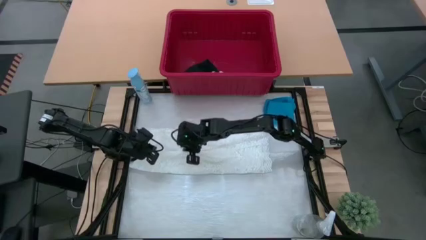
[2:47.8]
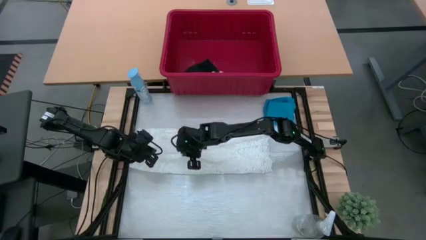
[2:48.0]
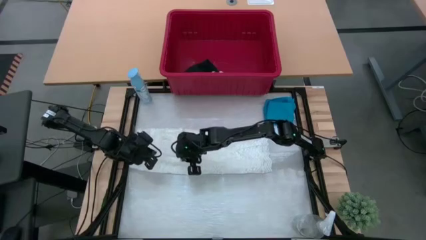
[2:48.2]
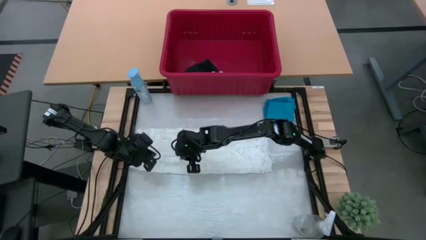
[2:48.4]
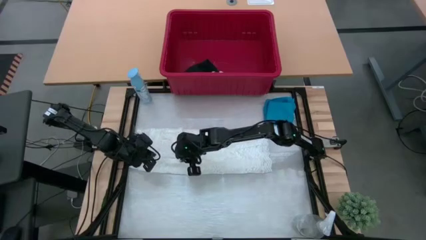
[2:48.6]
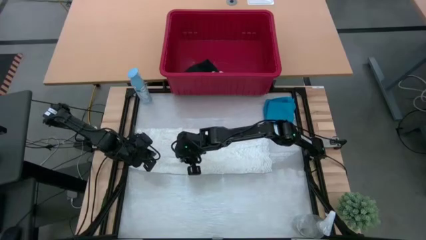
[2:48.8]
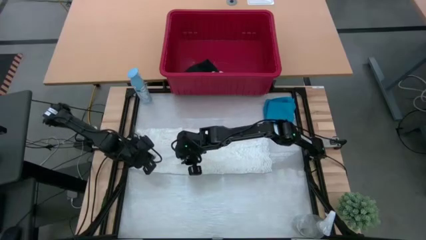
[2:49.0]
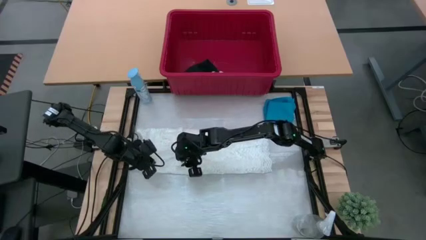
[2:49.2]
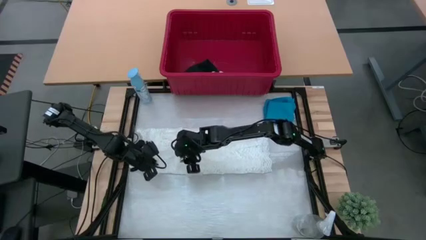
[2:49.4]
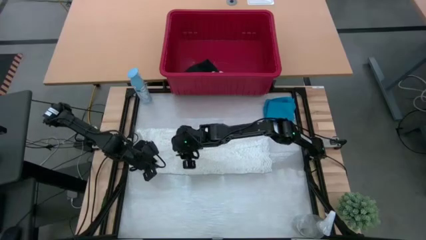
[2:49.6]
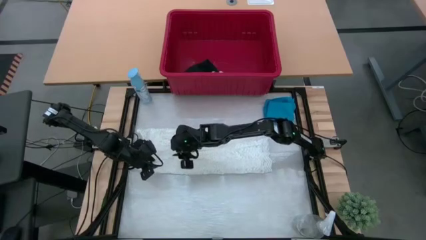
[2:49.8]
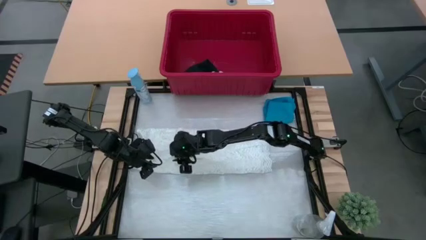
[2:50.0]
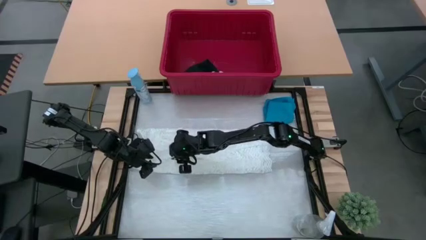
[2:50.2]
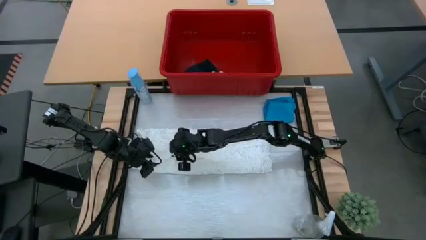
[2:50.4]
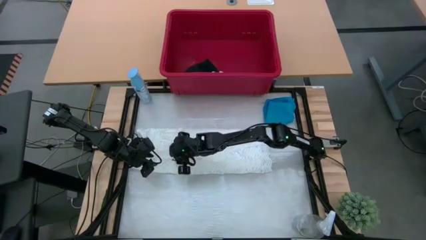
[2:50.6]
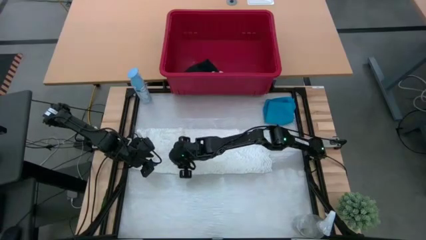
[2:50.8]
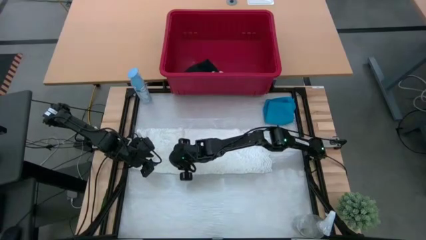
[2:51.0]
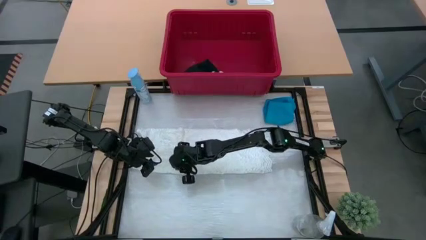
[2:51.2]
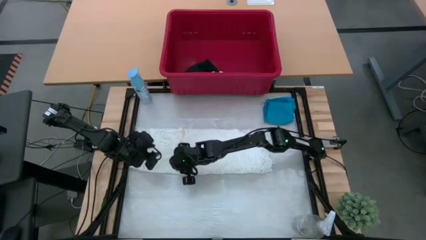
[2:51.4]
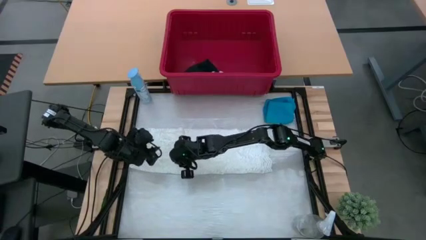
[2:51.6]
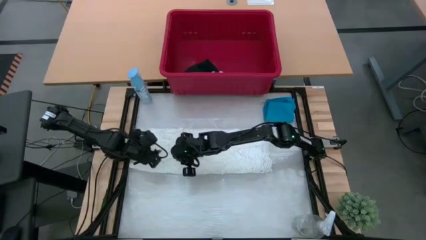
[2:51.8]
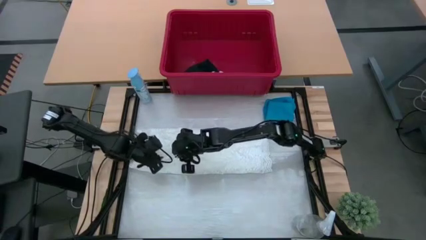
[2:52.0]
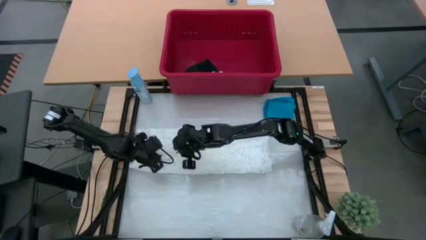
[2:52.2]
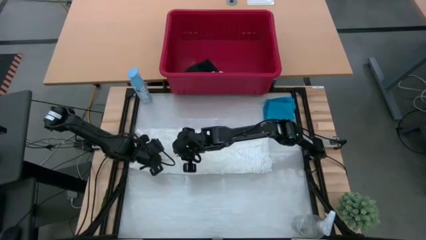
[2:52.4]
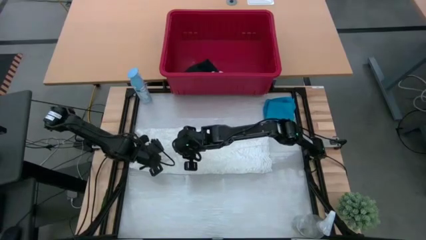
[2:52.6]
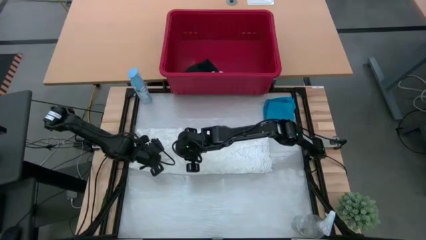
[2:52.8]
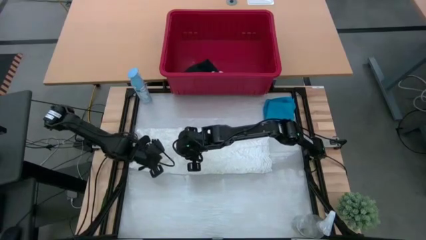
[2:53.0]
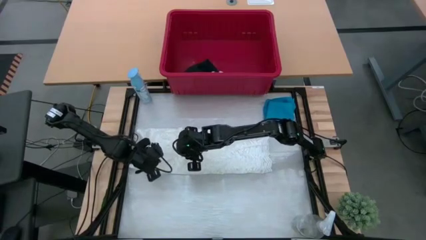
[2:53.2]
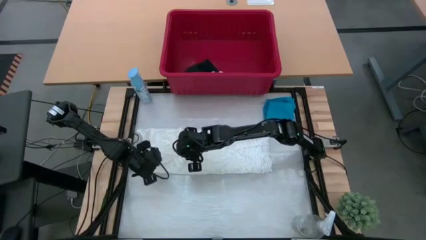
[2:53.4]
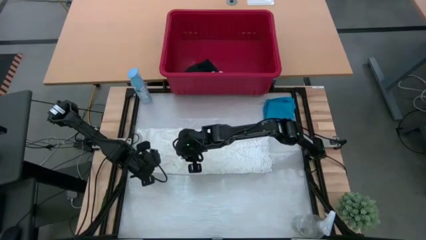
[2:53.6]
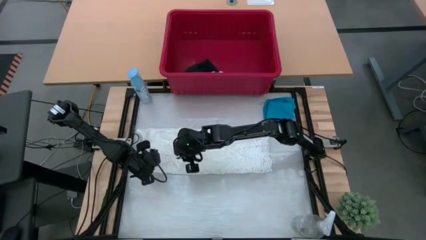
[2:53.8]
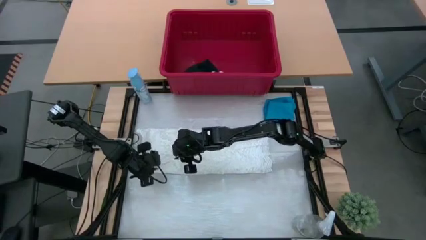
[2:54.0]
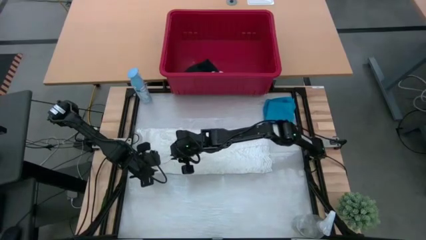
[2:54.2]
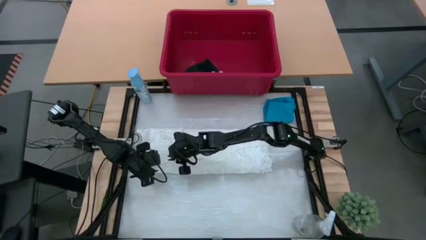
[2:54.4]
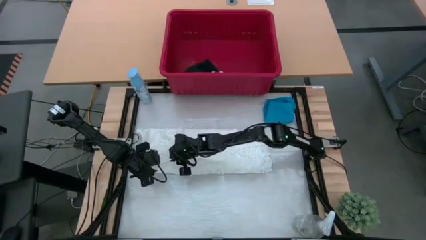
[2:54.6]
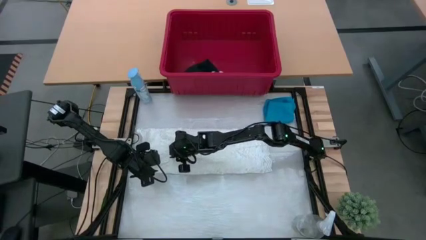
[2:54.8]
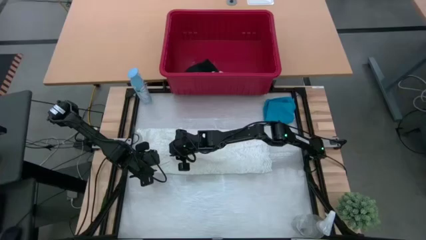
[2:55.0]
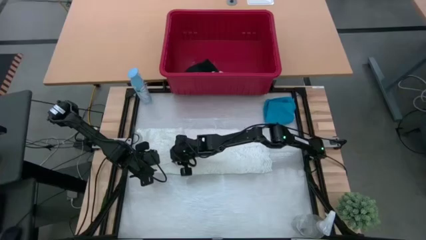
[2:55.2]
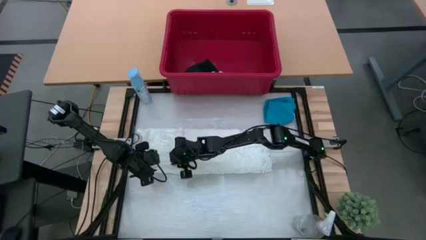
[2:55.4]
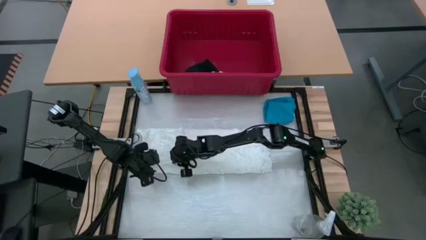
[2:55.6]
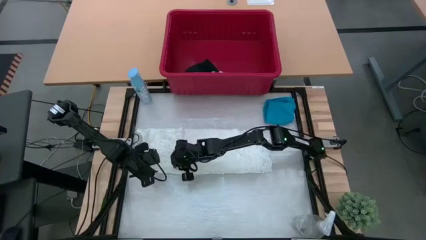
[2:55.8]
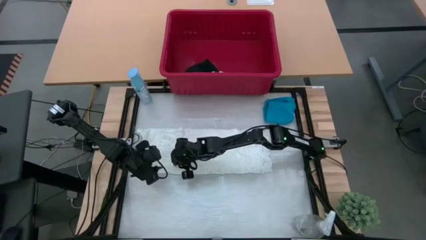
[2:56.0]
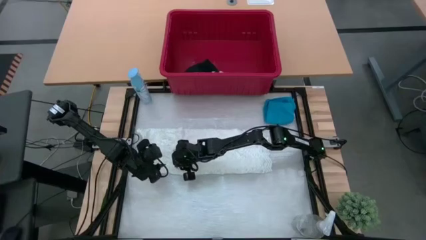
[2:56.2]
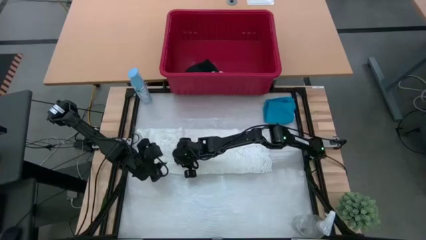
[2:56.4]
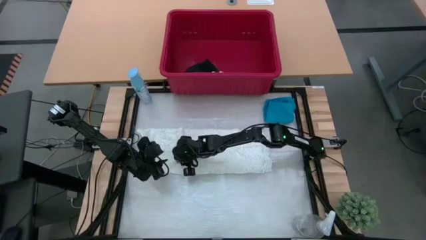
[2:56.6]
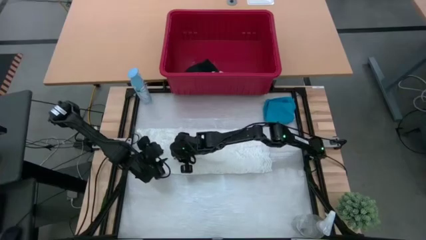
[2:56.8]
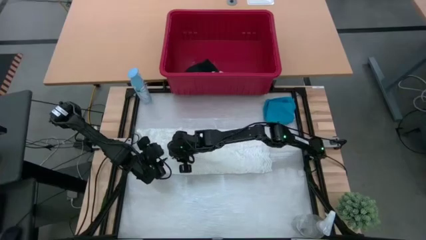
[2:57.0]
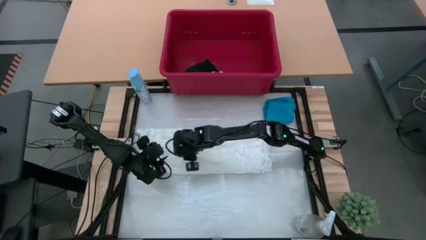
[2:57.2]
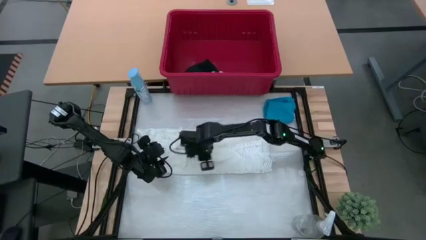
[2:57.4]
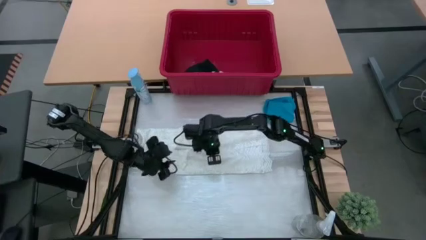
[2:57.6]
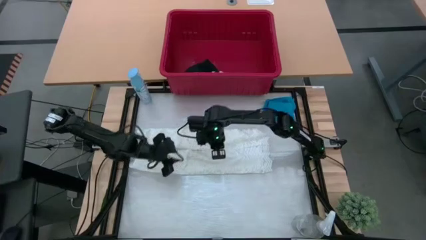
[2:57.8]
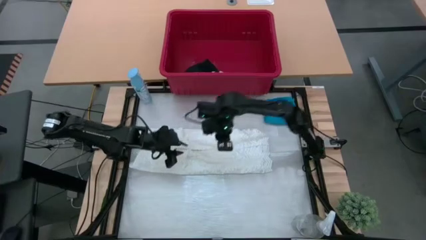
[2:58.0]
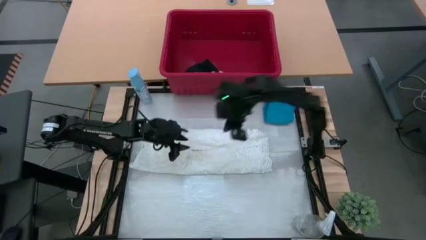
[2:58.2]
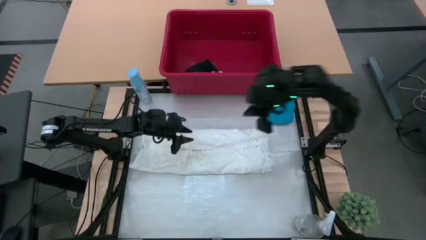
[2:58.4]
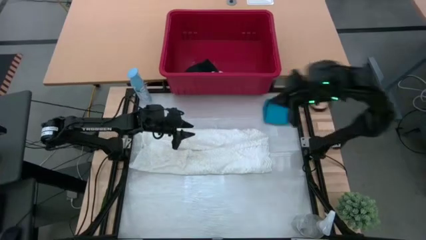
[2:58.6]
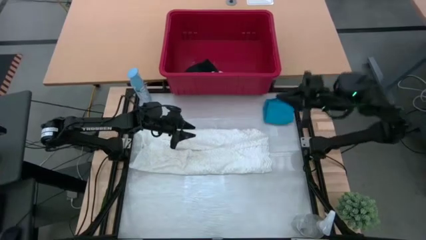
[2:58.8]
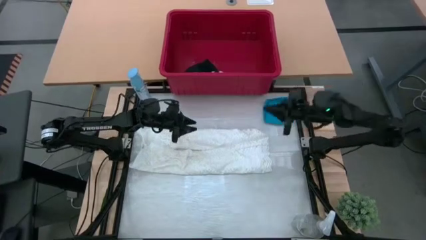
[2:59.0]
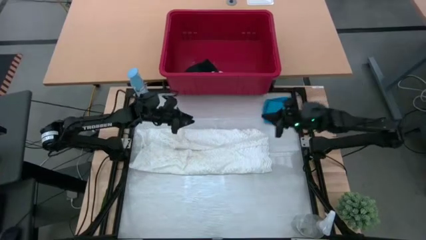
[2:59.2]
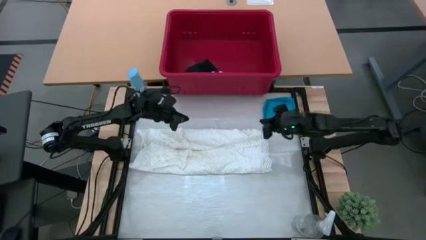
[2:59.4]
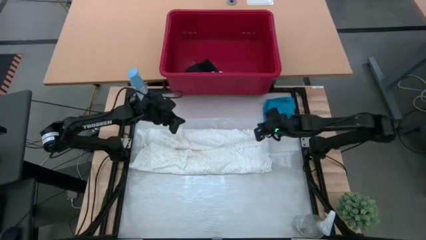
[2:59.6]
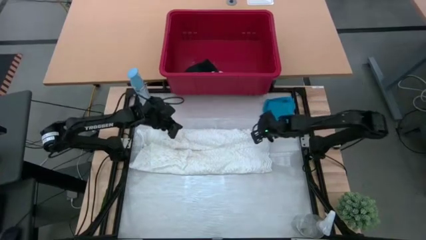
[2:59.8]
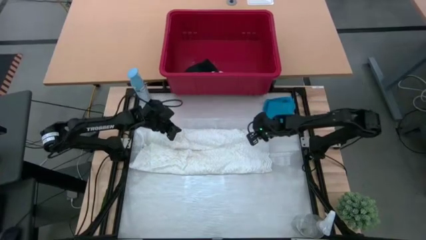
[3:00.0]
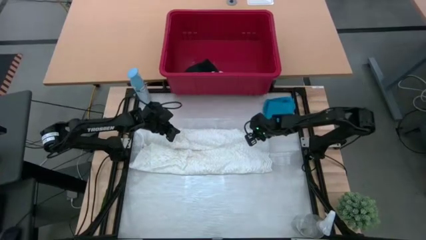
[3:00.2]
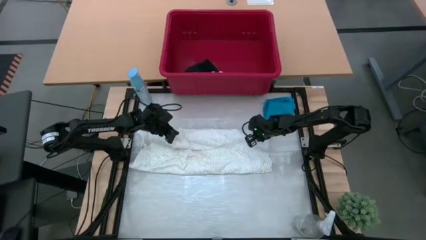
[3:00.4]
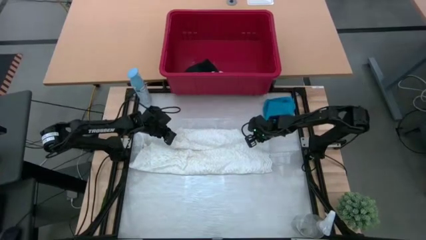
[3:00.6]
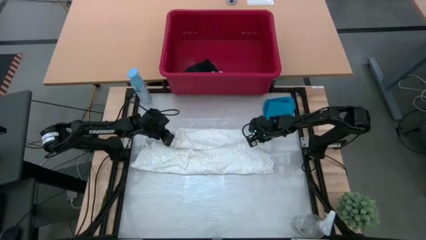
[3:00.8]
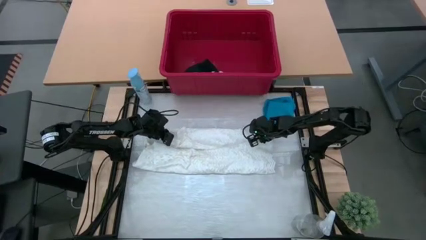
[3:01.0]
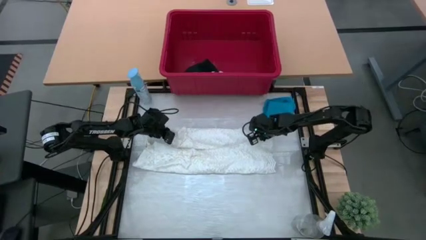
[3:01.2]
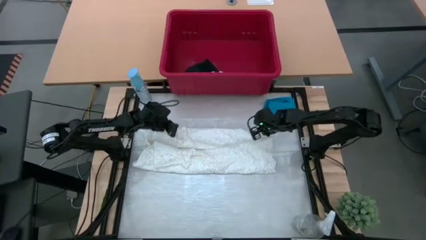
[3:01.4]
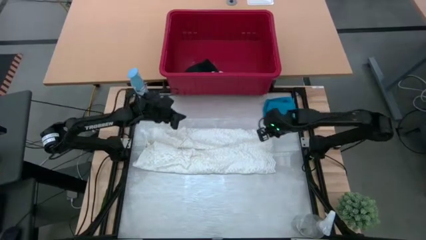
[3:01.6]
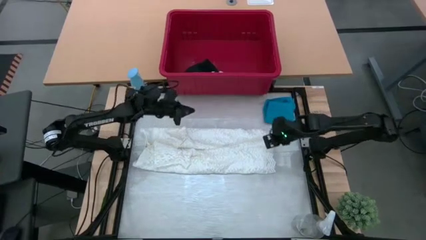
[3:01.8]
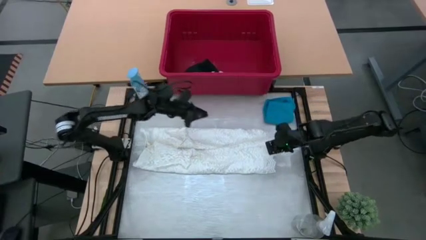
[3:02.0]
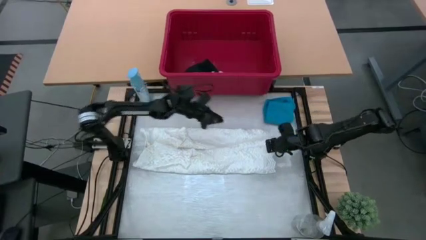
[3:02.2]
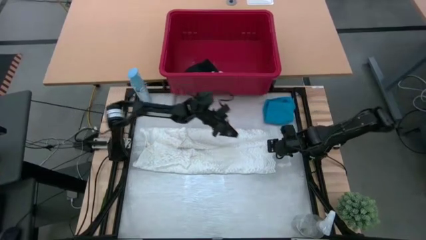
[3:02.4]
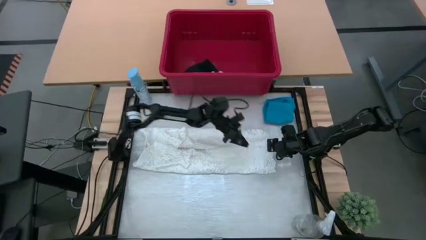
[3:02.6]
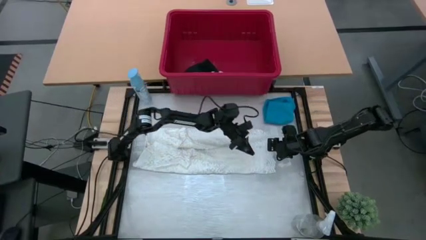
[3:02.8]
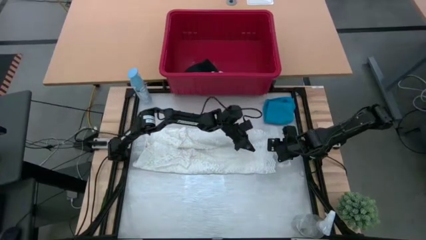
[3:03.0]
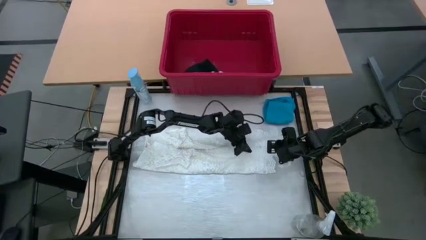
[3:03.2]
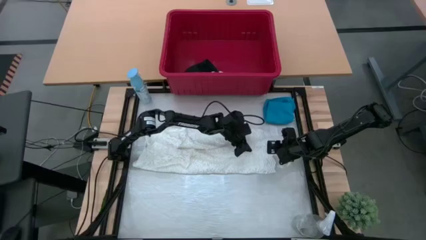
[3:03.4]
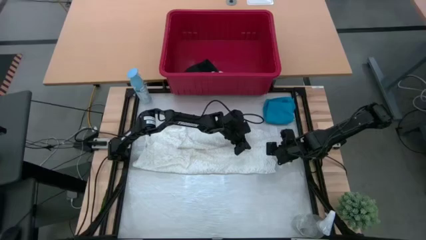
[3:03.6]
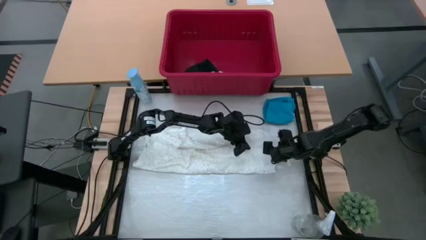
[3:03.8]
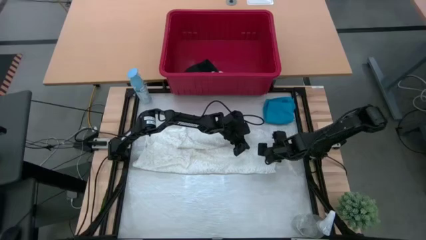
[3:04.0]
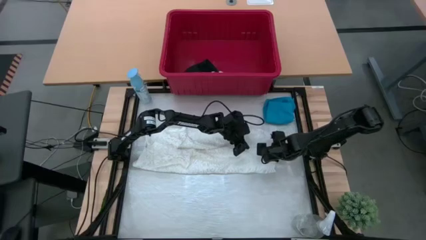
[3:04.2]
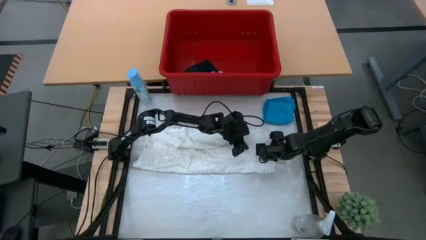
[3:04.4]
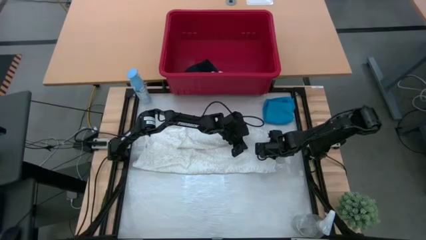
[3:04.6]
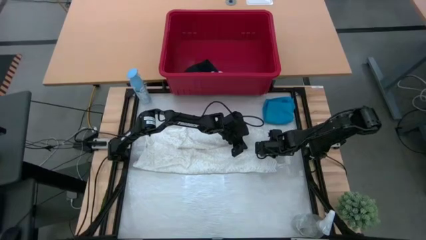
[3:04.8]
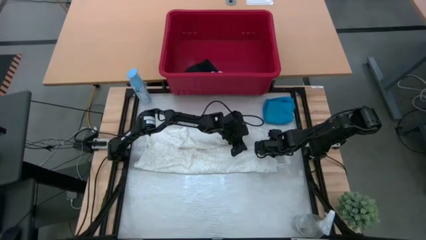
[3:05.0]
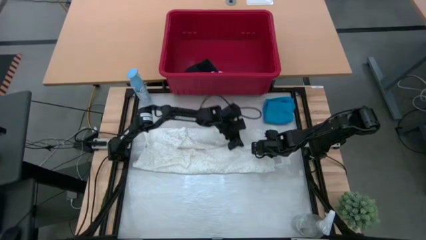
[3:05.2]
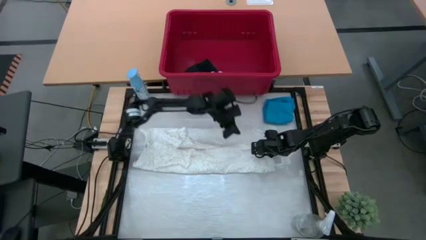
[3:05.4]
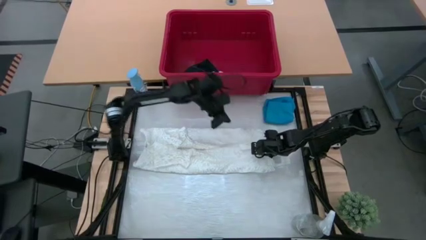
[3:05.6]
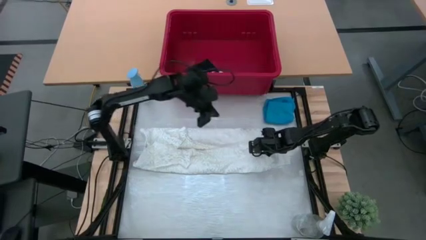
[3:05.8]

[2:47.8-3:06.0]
Task: Fold laundry
Fold the white blouse
